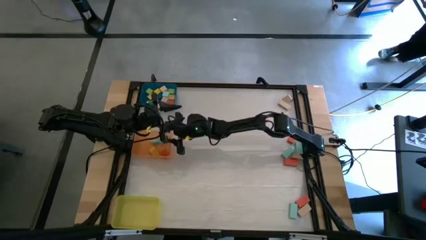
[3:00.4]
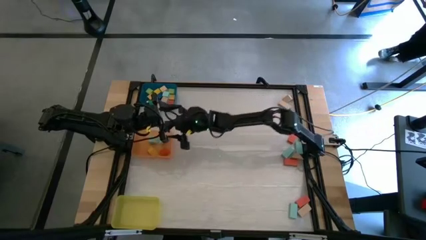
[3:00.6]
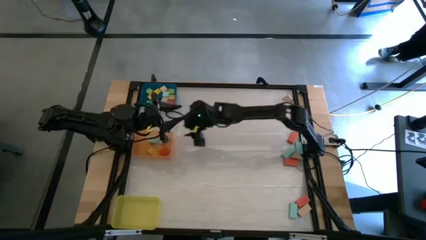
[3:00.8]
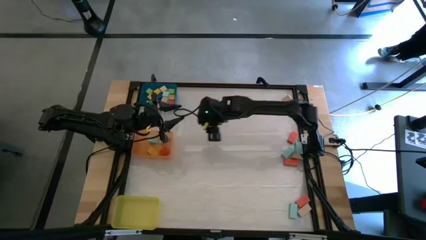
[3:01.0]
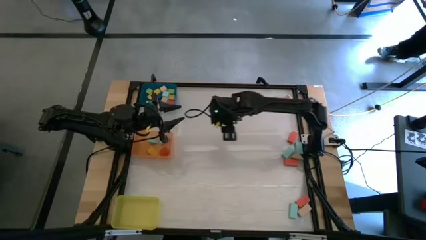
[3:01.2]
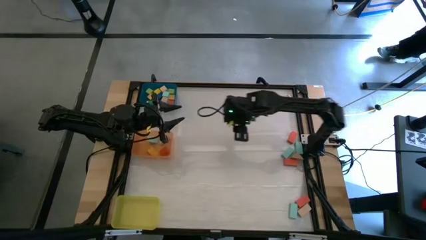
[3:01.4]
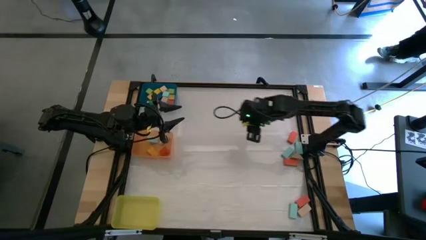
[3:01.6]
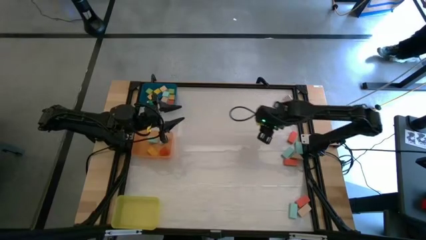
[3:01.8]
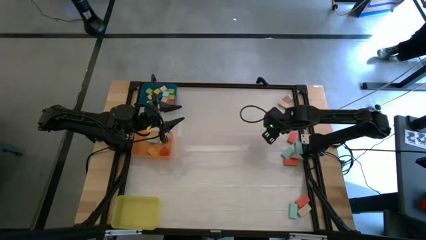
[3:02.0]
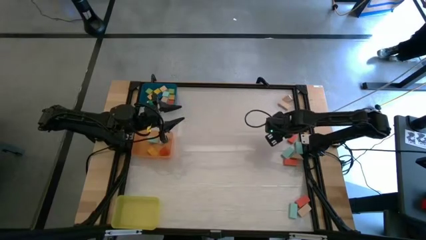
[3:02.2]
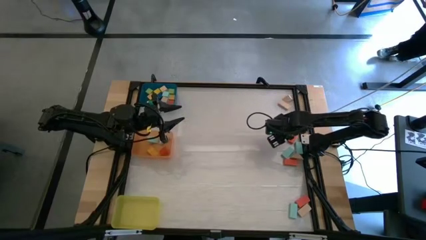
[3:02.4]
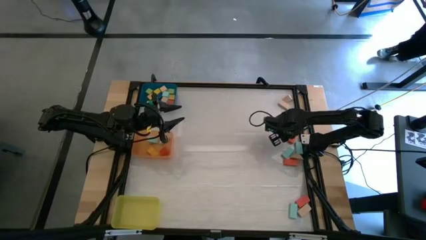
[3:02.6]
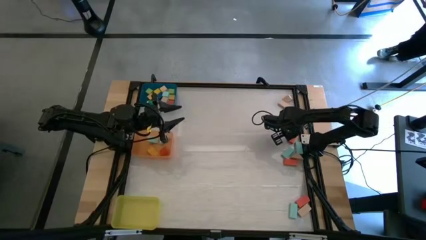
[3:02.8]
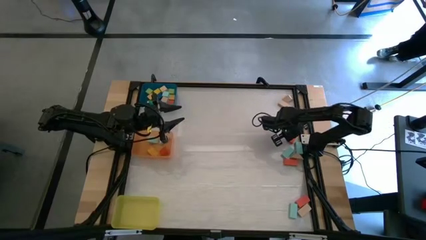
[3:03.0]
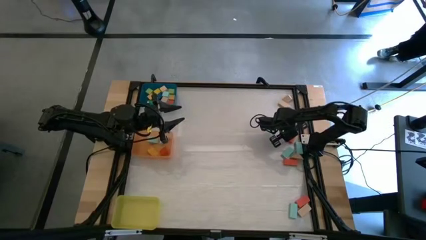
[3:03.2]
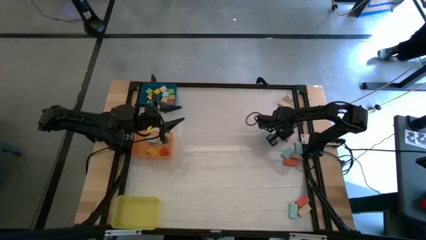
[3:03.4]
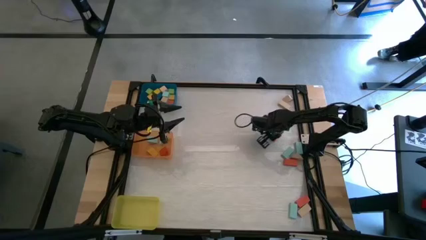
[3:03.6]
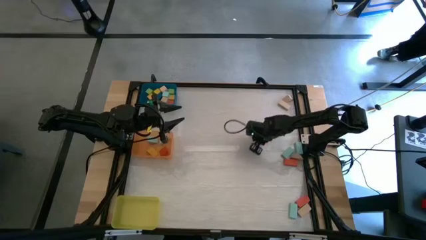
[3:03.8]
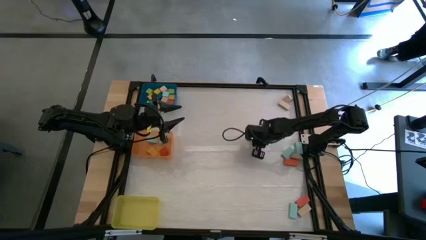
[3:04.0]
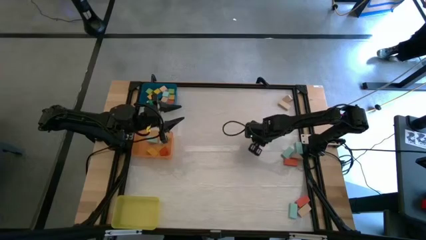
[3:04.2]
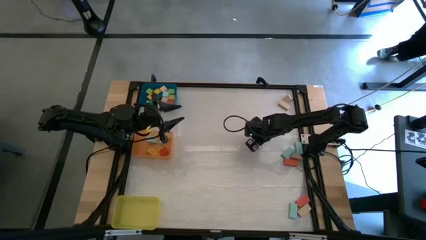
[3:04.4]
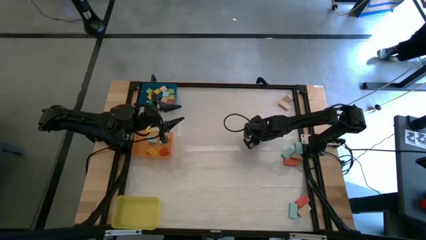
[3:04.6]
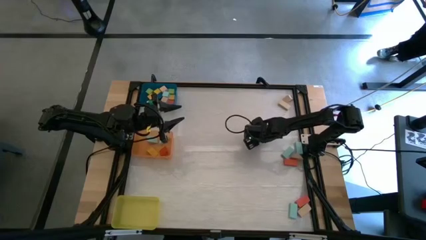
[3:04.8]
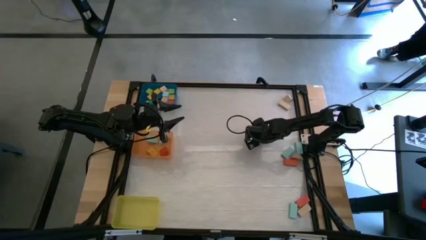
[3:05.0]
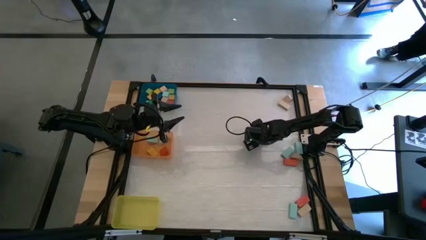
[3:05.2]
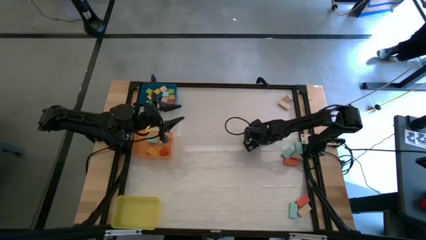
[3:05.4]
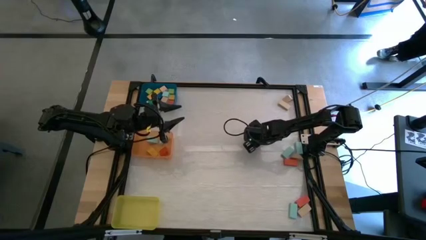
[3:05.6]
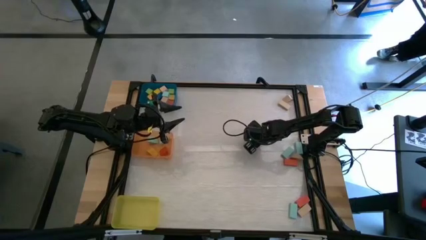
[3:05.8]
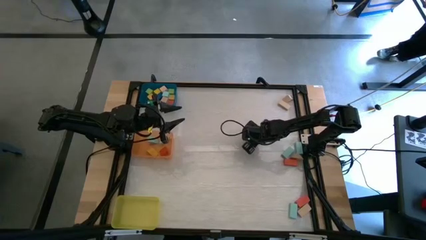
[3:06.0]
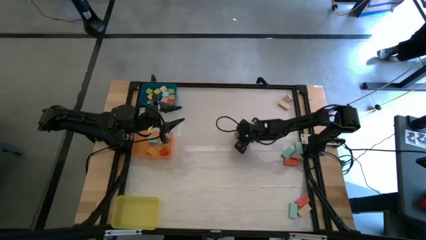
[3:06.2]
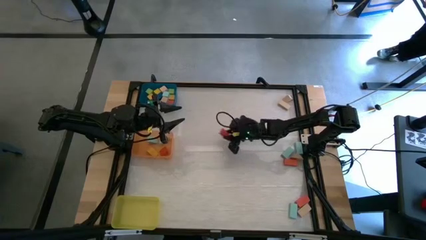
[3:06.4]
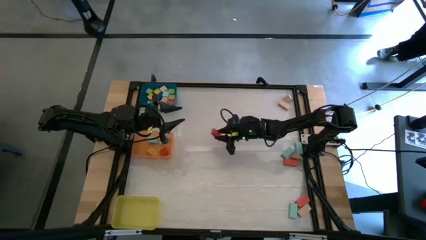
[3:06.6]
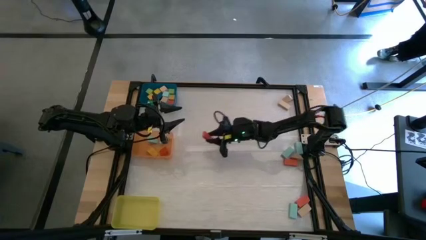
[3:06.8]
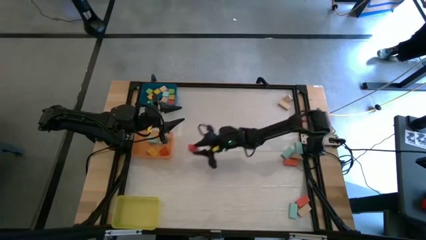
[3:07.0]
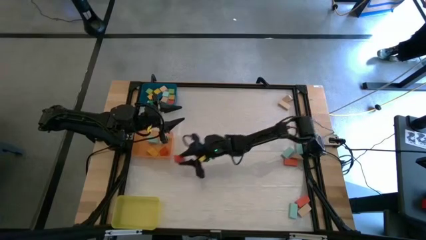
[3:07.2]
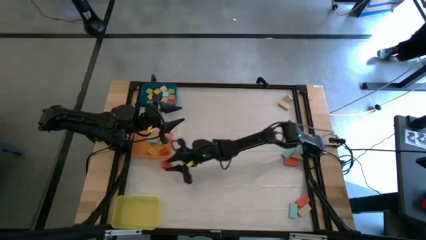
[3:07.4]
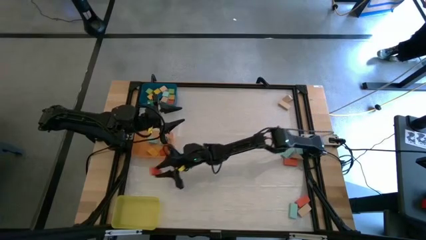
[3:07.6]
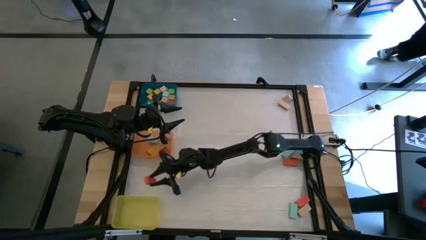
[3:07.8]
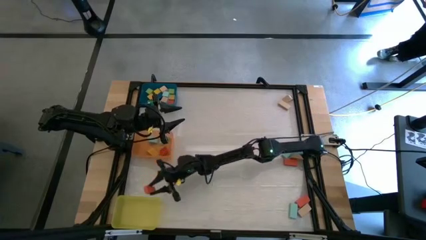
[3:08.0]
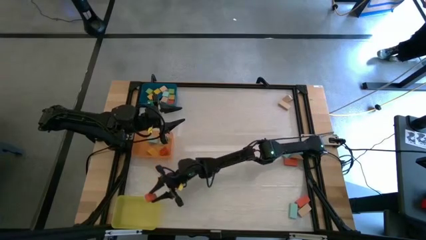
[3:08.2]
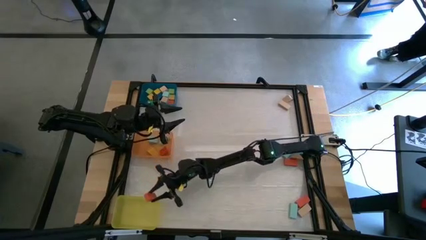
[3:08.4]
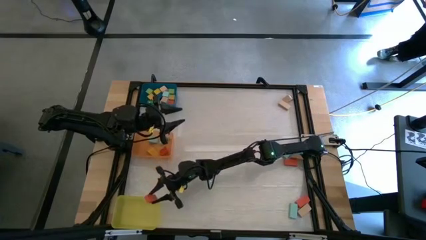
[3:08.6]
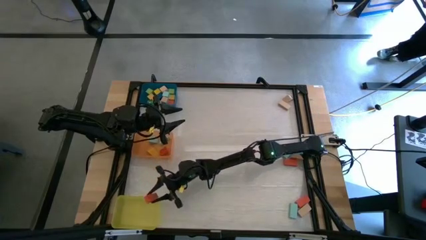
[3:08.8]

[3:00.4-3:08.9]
Task: Sort blocks by size
Put the red rectangular block into the yellow bin

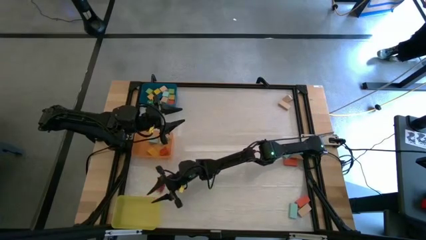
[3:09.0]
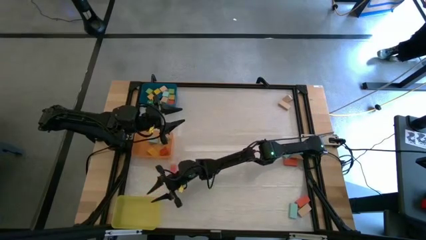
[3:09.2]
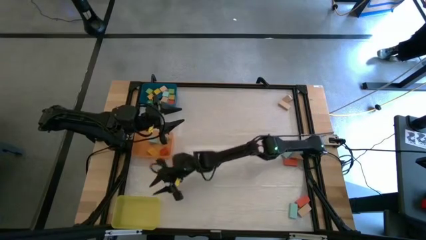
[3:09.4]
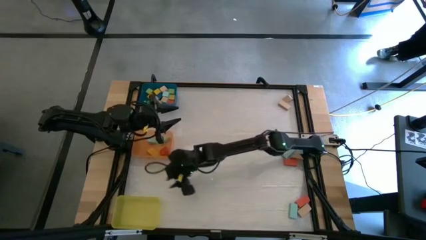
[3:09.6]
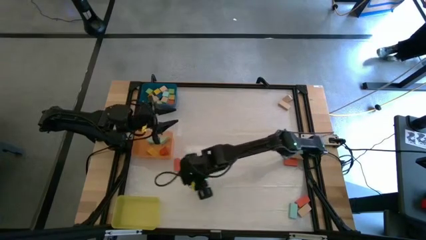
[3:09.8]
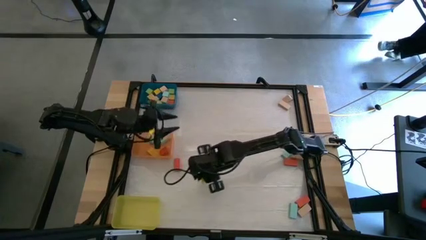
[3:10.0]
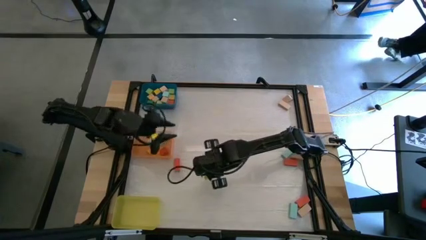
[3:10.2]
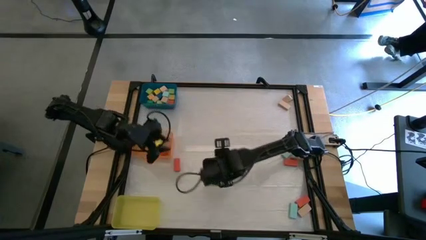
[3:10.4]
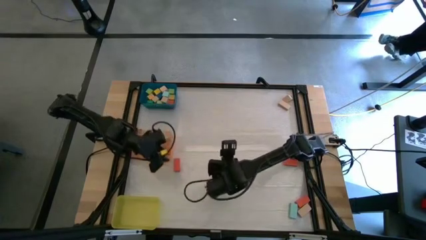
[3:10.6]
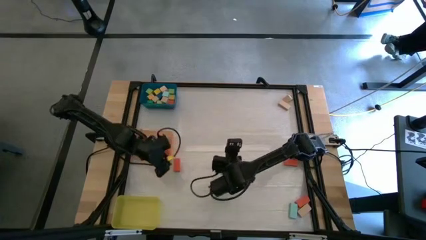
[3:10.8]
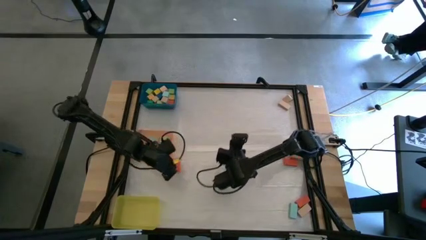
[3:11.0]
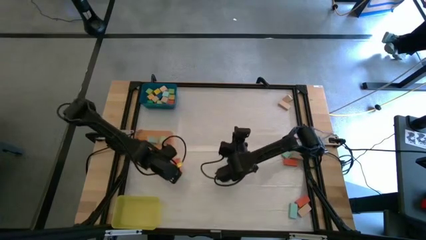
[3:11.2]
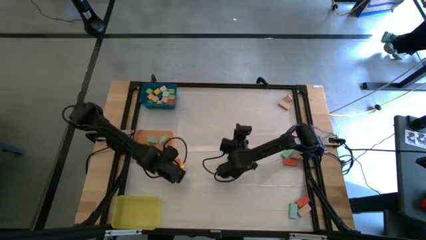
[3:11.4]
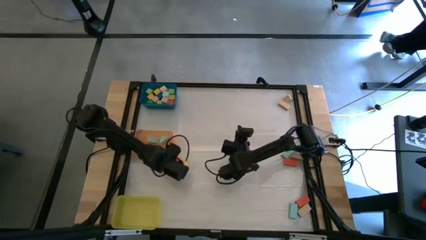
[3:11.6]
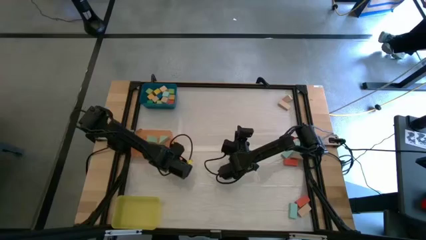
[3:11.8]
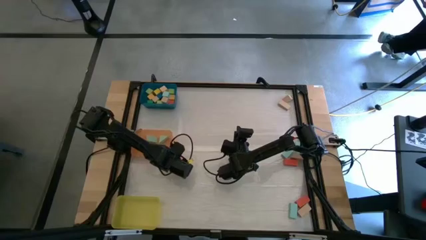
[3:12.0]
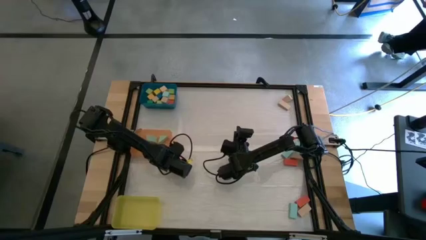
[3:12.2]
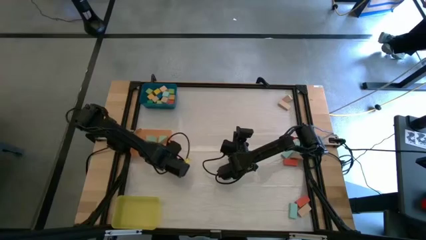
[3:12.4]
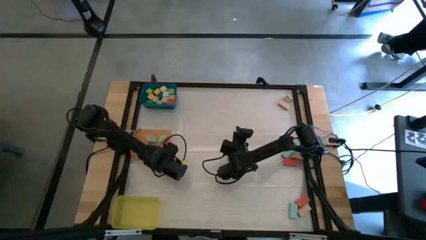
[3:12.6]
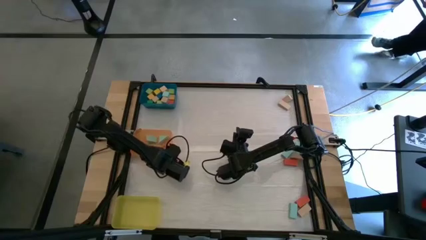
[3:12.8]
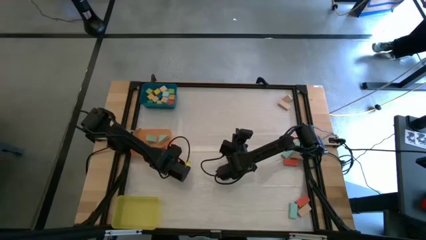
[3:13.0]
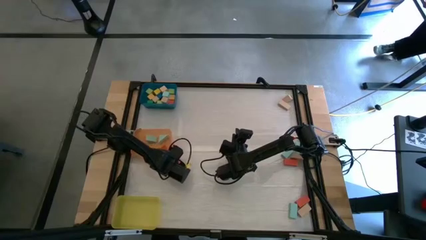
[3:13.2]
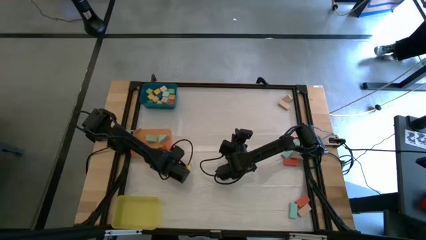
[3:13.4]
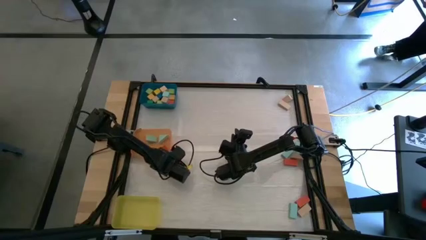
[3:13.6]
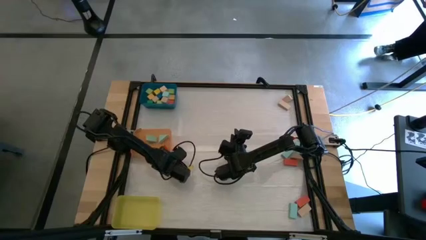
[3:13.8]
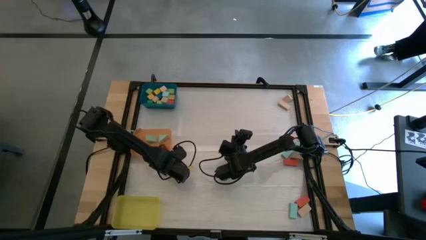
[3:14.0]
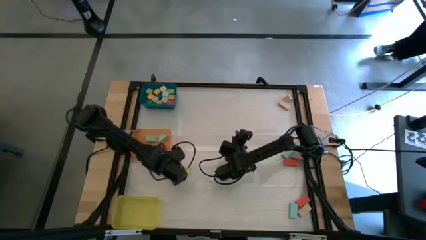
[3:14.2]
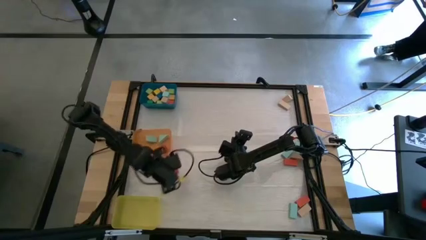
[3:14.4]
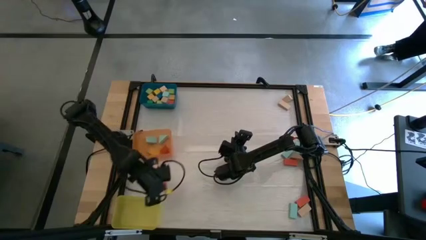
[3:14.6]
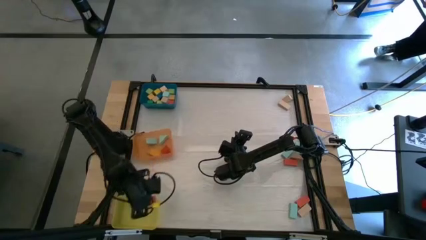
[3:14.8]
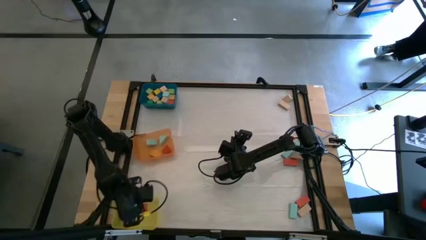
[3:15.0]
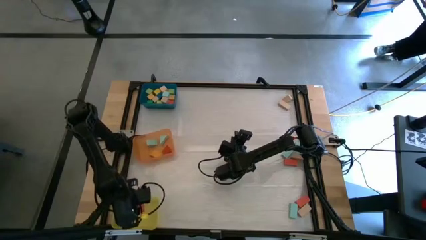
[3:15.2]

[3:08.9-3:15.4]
Put the red rectangular block into the yellow bin

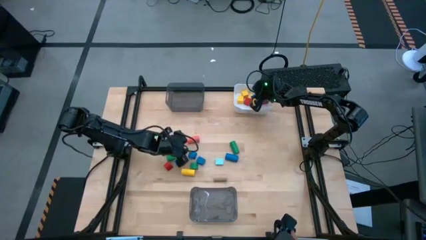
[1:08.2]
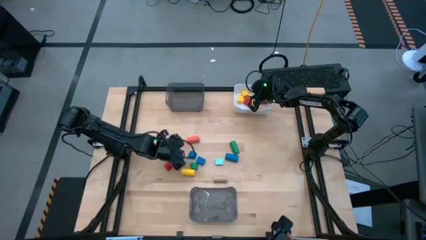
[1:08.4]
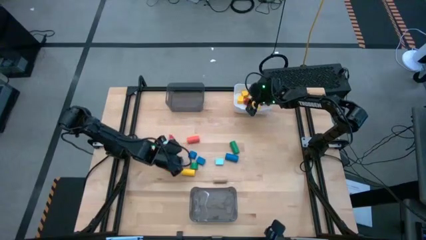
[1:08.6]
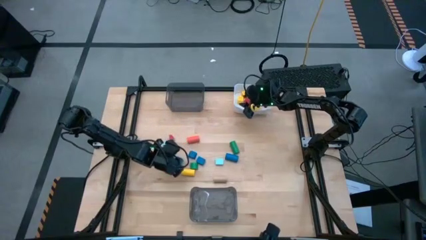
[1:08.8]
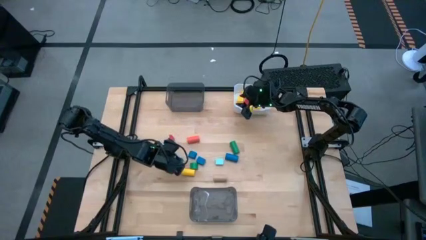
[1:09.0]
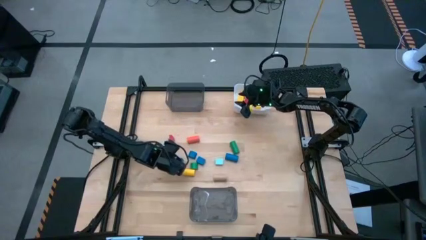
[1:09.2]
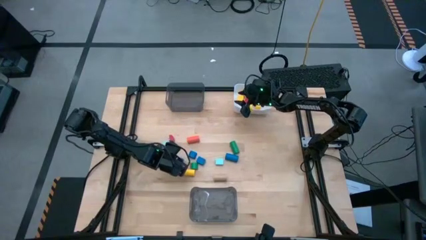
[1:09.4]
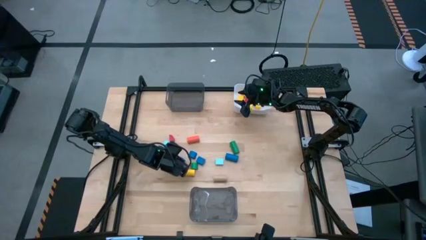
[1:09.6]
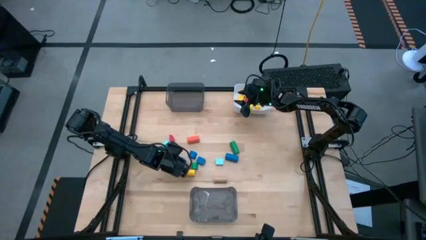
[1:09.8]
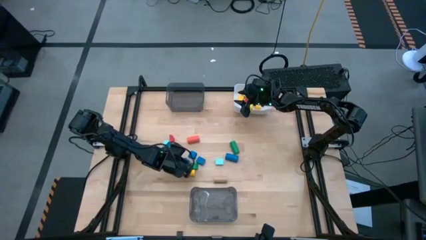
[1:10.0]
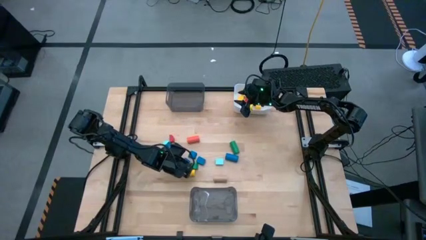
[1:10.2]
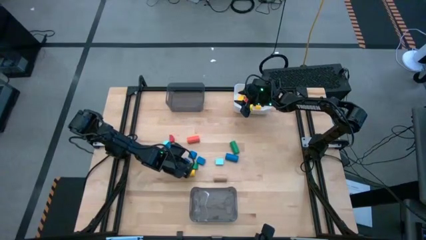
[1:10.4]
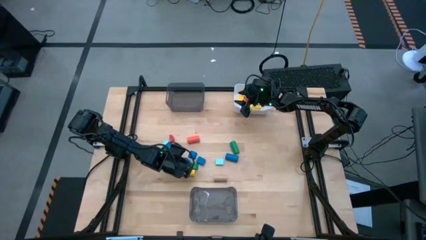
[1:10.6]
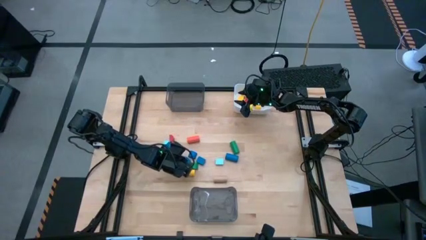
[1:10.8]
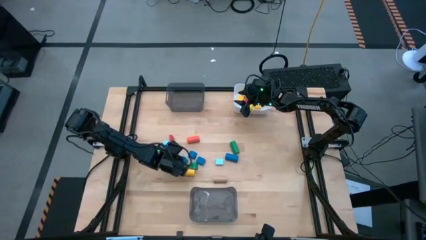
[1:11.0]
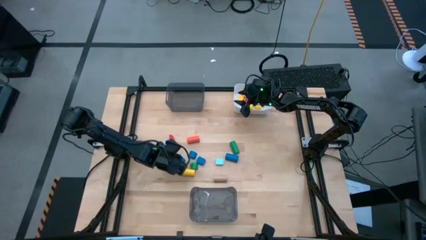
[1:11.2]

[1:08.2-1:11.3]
Task: Sort blocks by size
Put the blue cube game piece into the white bin
